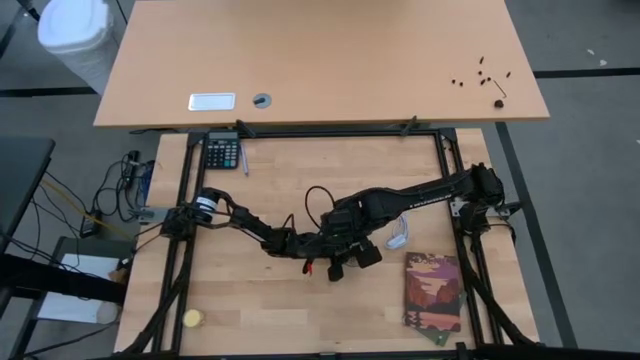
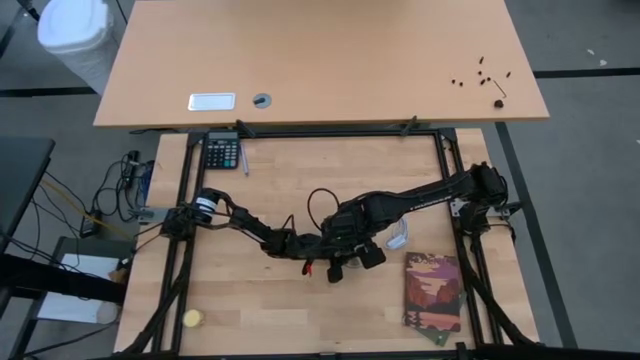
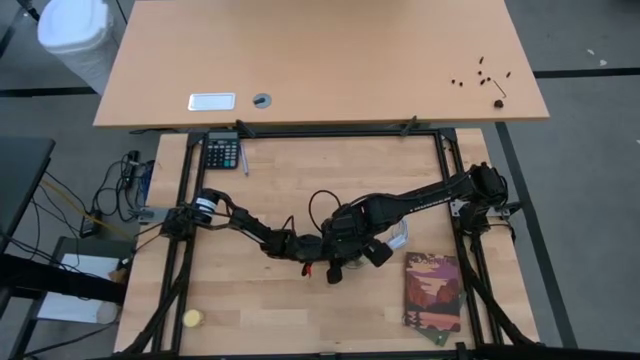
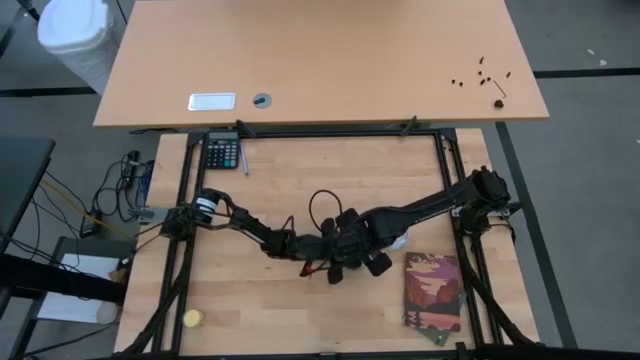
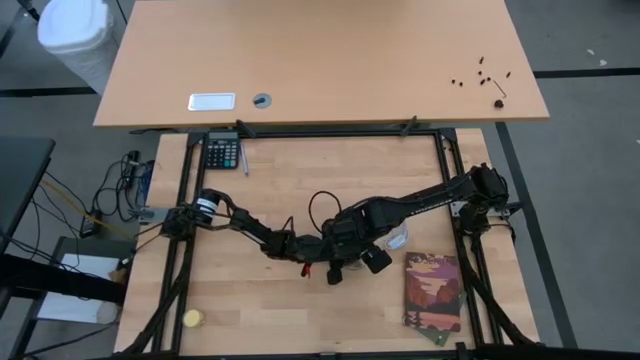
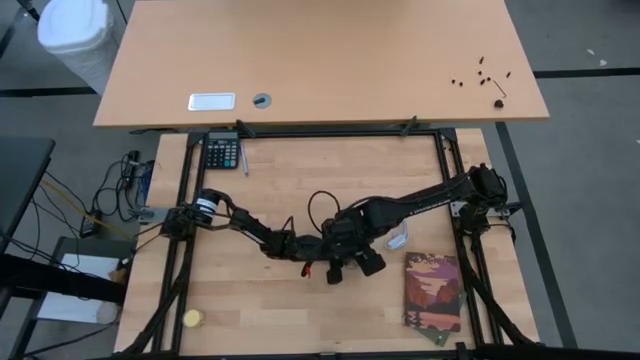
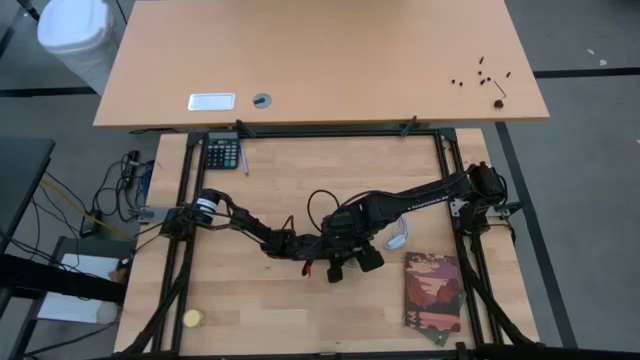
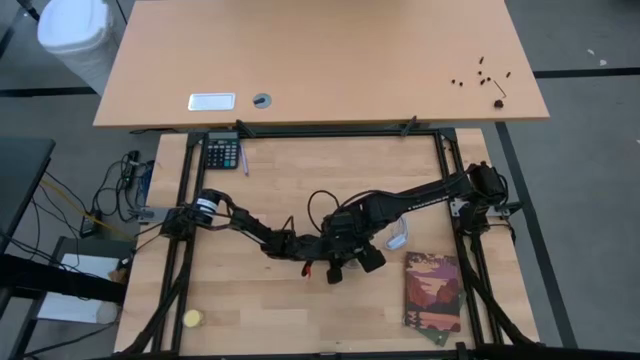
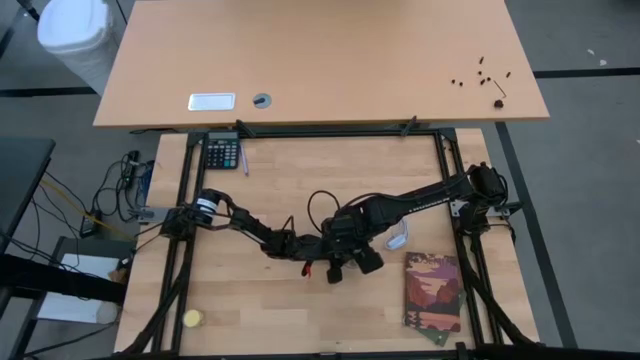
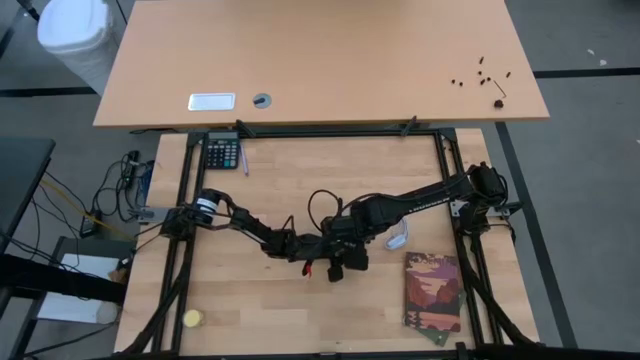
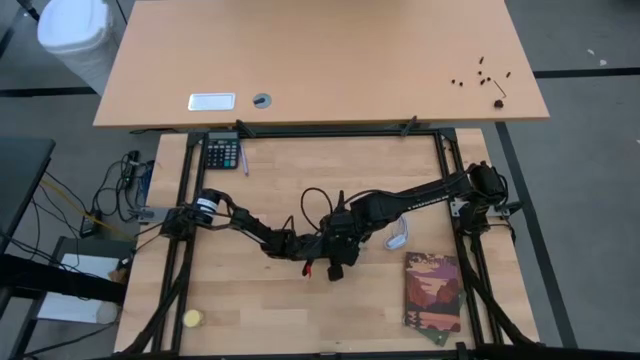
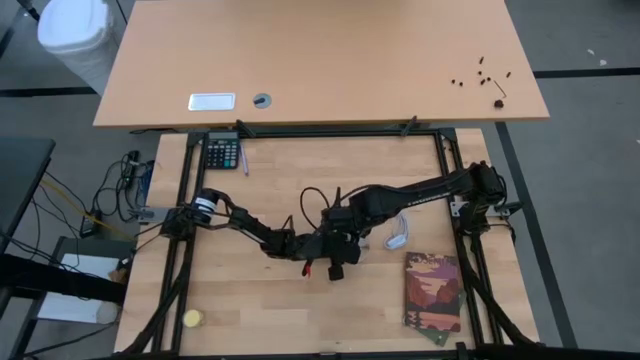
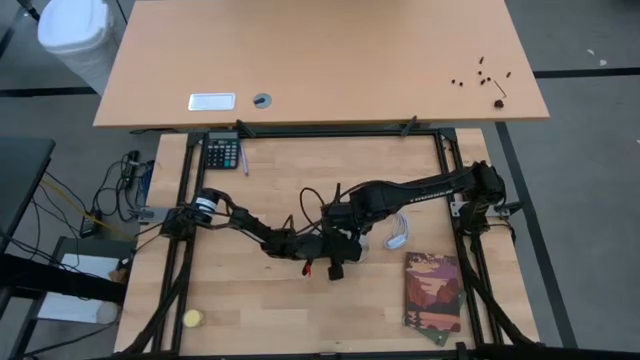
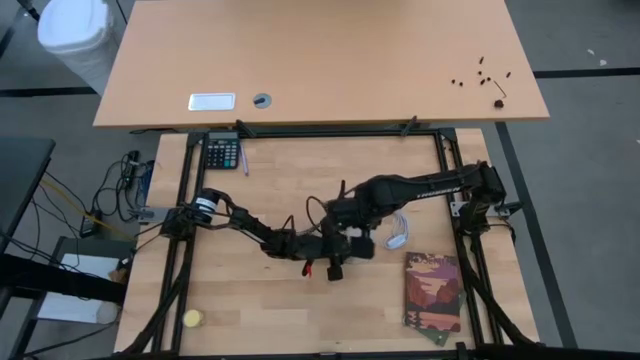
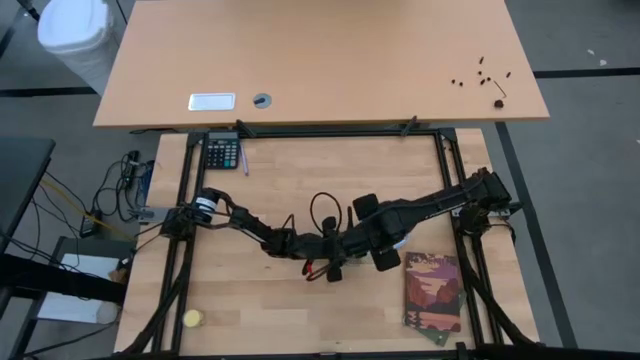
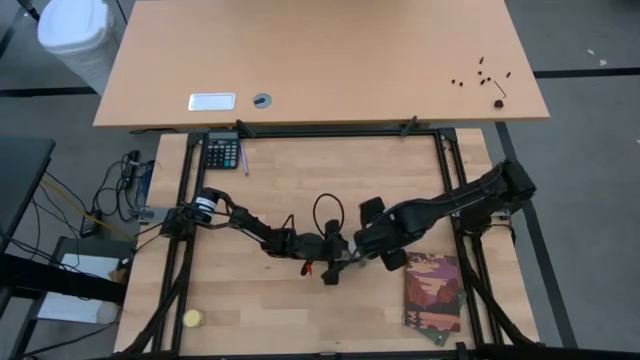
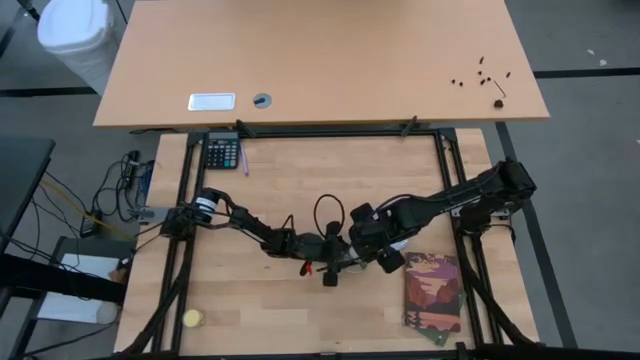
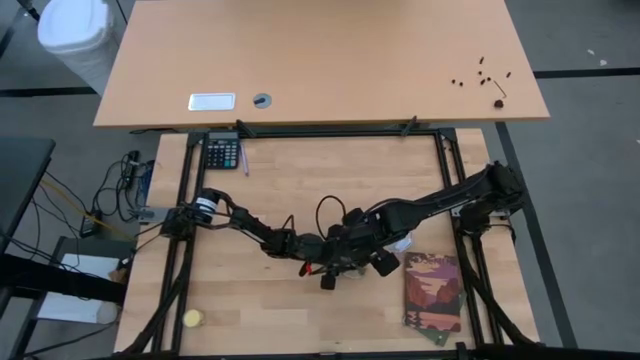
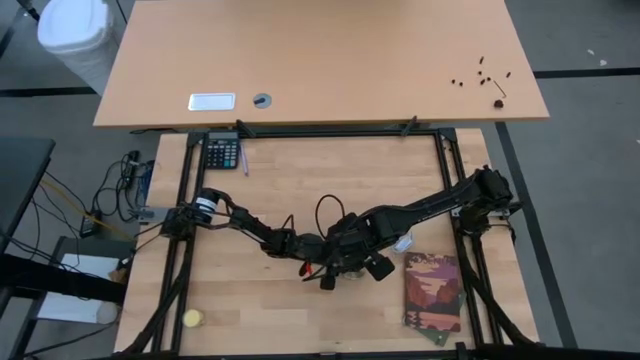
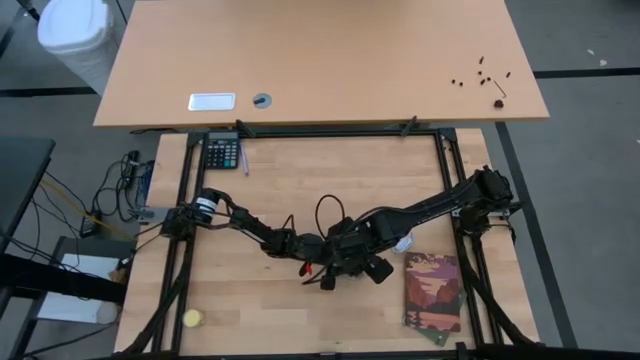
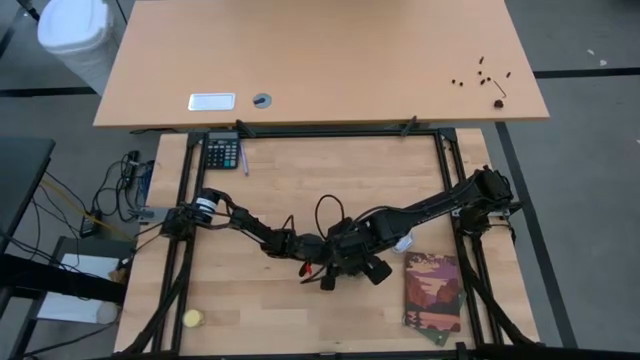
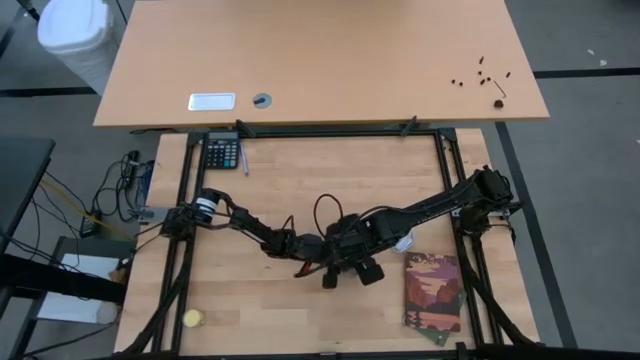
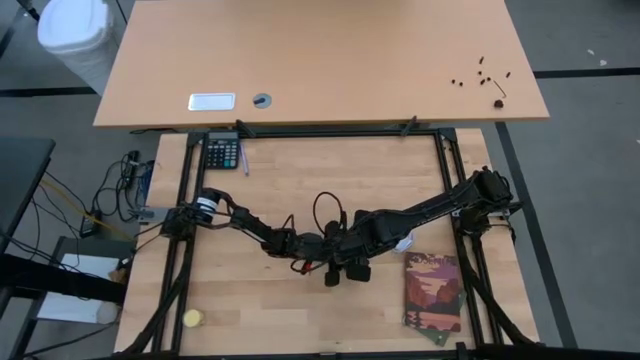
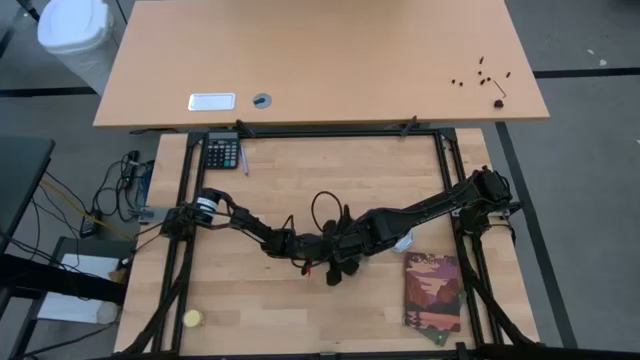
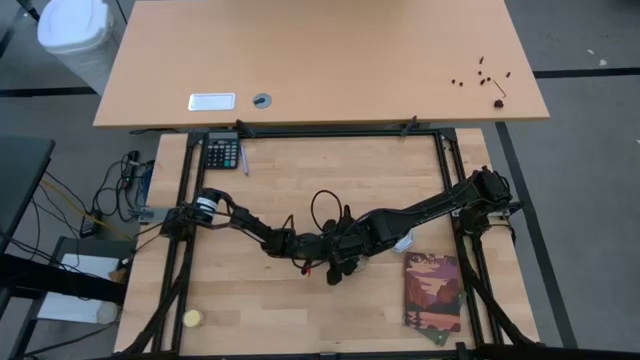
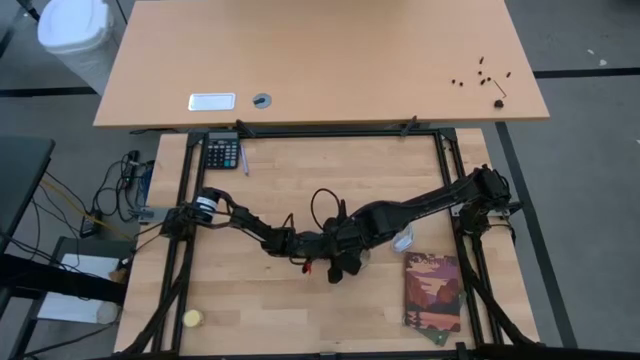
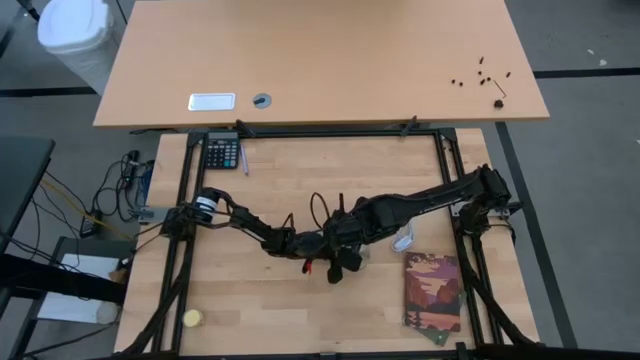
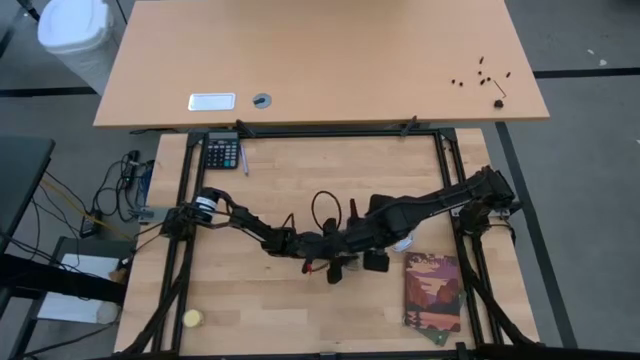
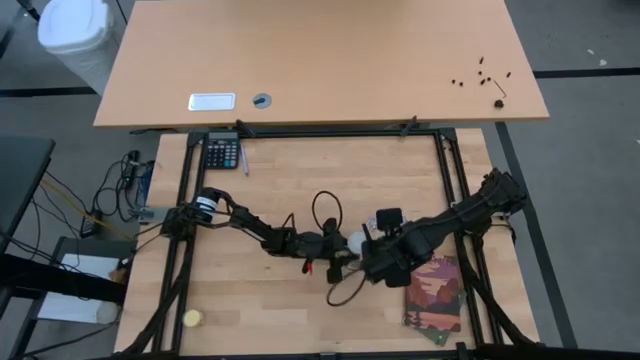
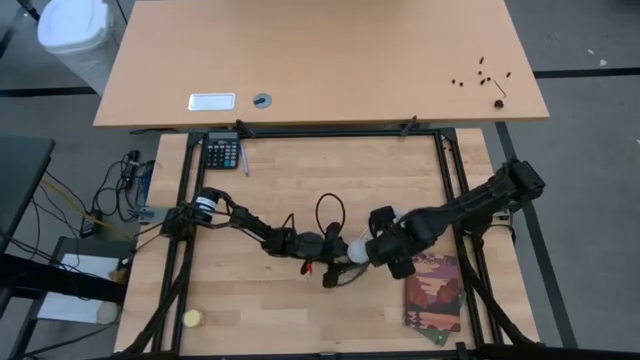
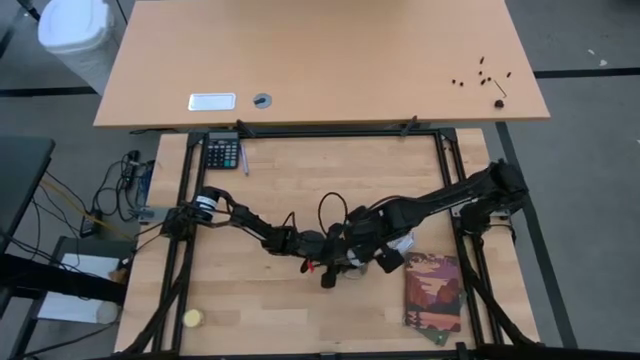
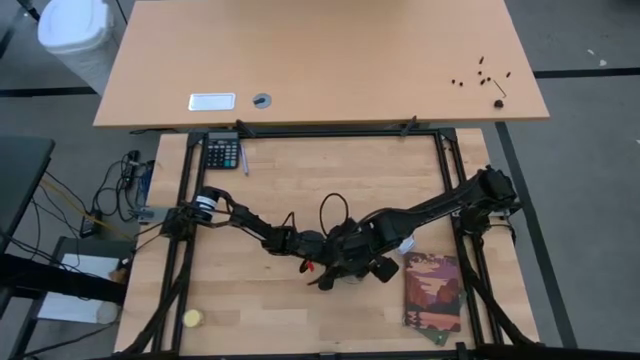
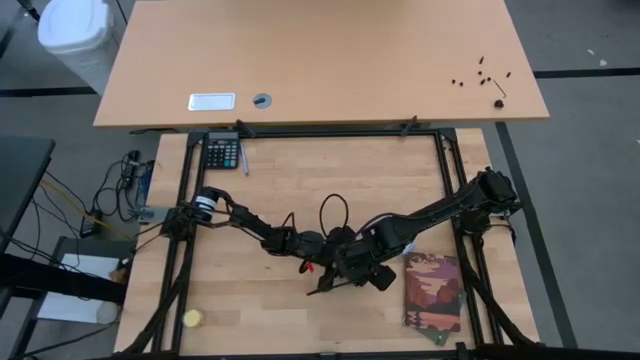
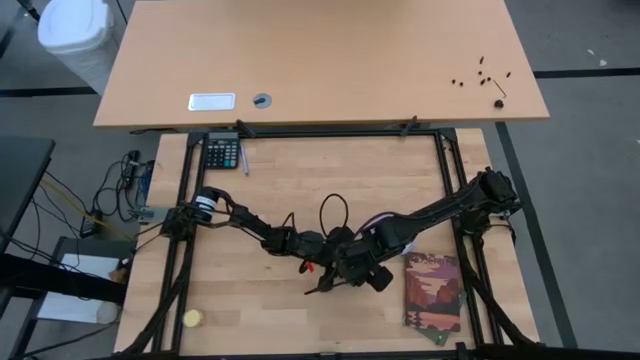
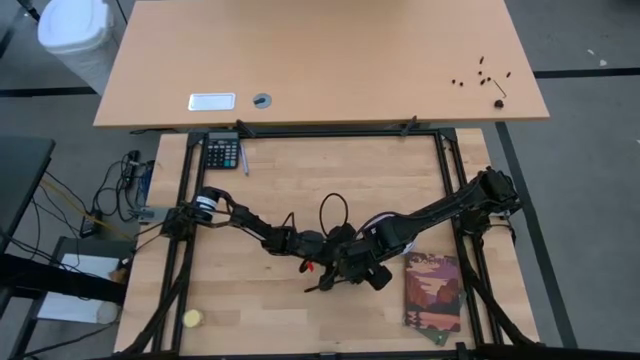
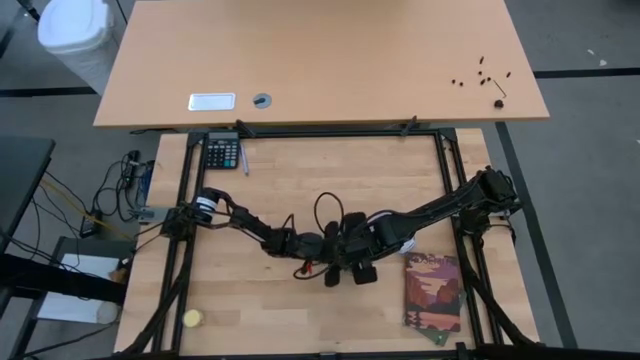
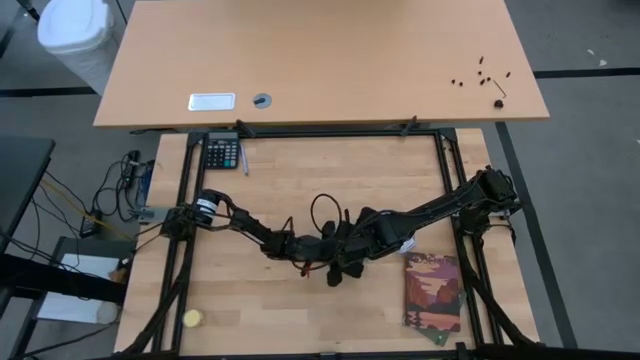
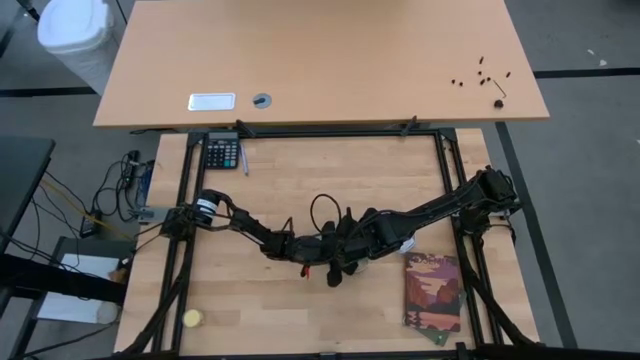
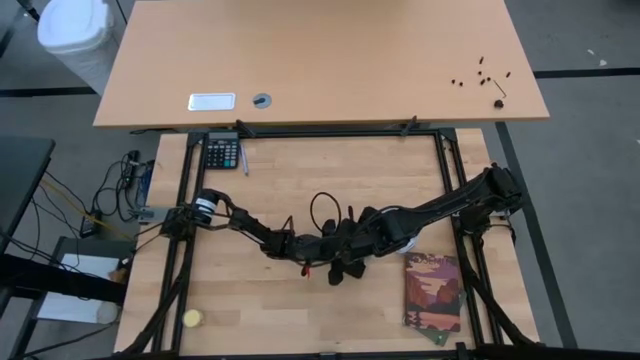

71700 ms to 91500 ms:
Task: Screw lightbulb
Insert the lightbulb into the lamp socket

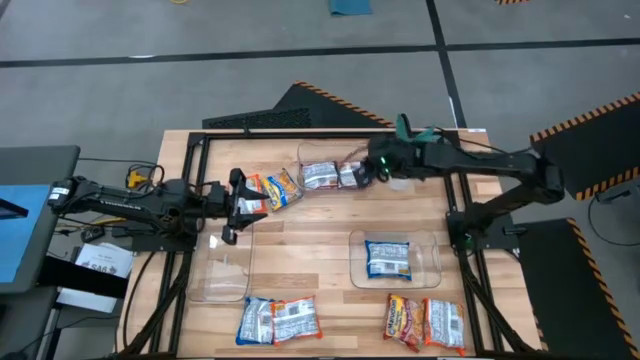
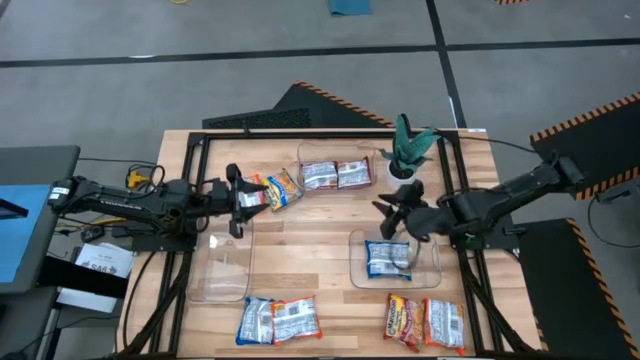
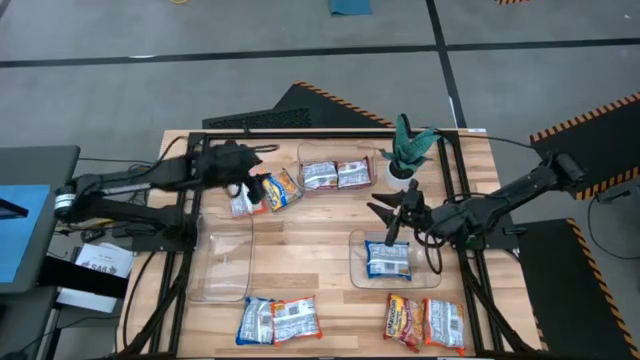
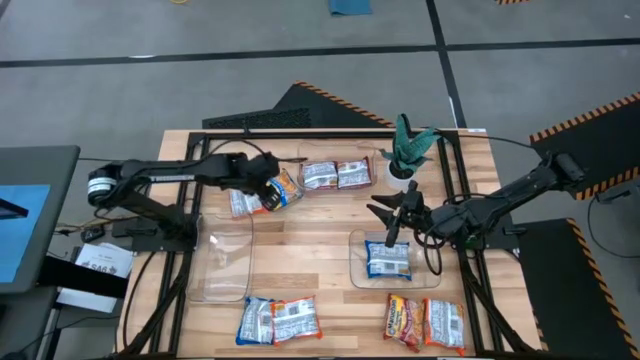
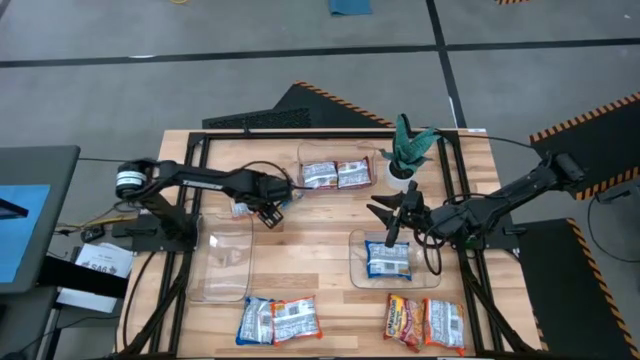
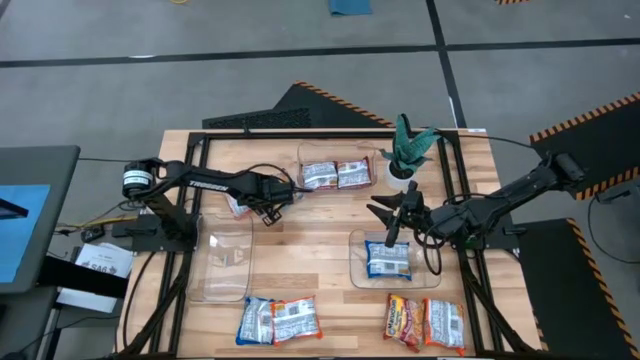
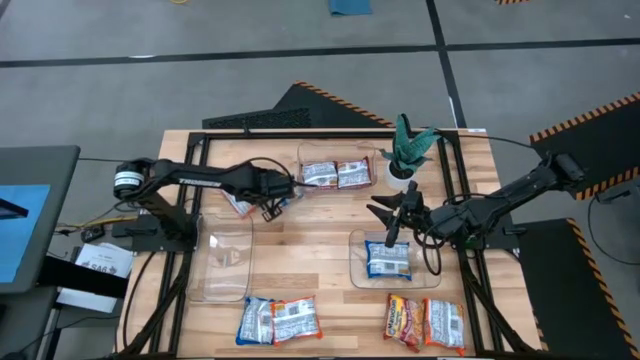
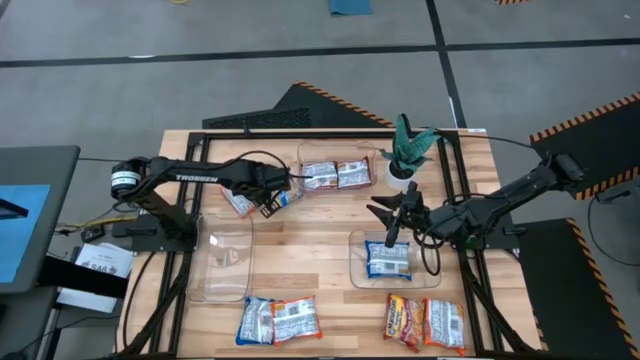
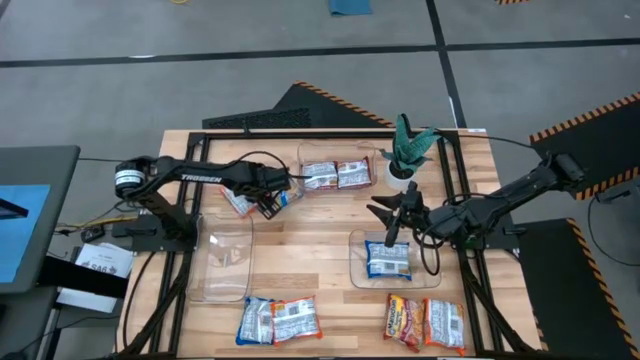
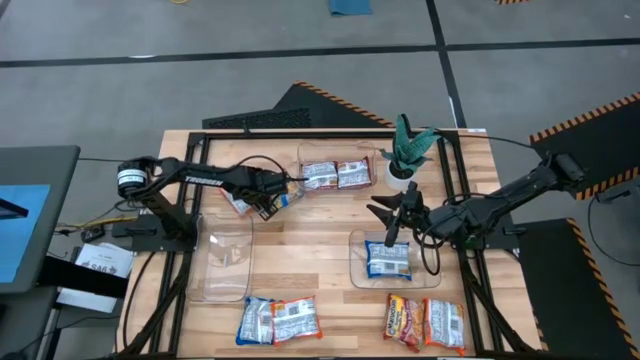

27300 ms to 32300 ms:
Task: Sort Maruchan noodles
Put the top left orange bag into the bottom left transparent bin
